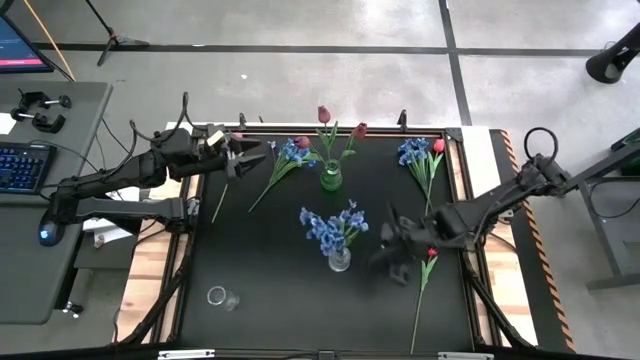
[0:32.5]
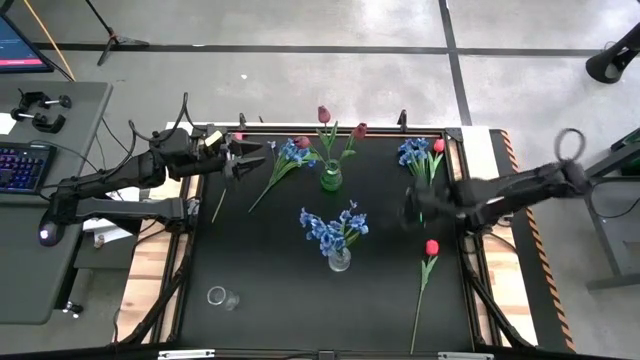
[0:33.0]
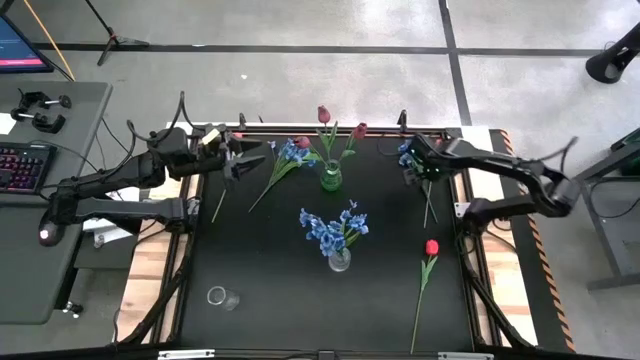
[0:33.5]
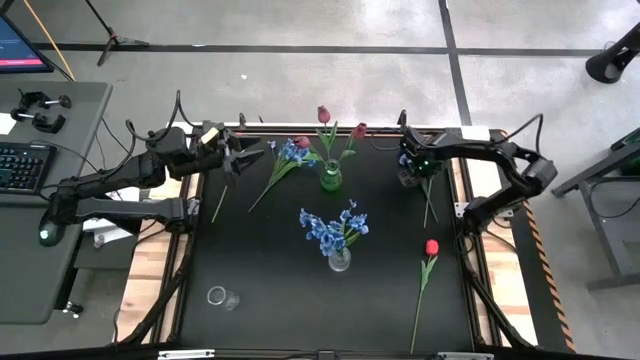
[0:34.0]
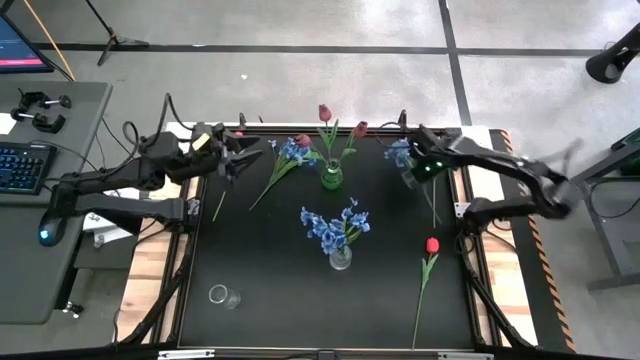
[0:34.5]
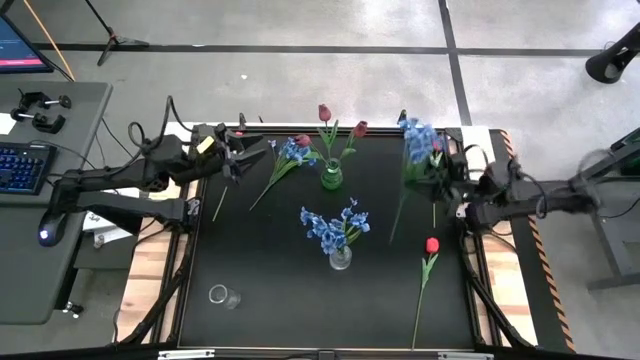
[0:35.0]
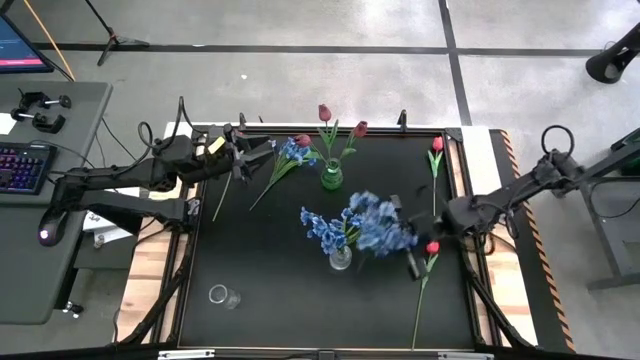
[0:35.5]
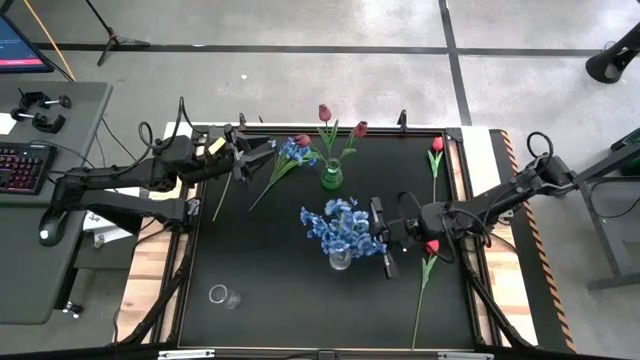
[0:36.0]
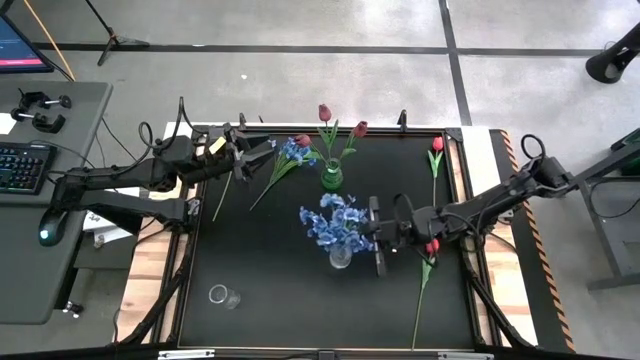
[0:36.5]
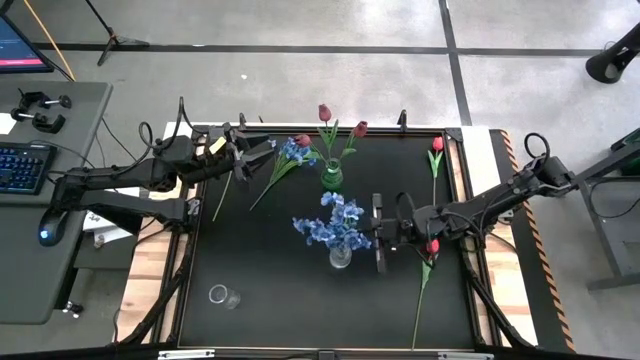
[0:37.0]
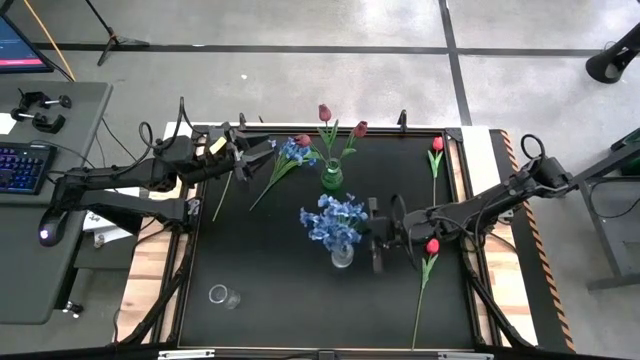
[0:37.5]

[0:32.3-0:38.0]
Task: Sort flowers into vase by color
Put the right blue flowers into the right transparent vase

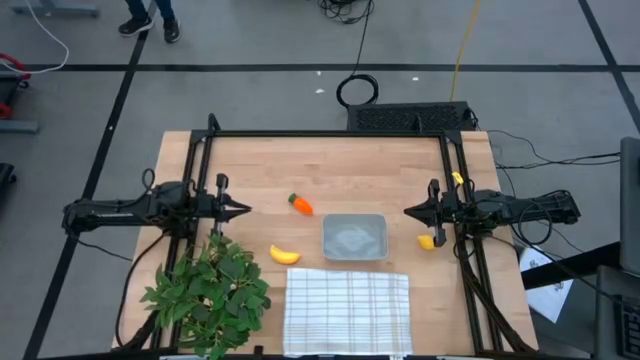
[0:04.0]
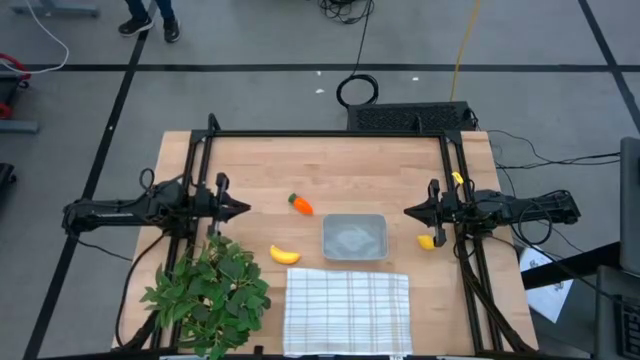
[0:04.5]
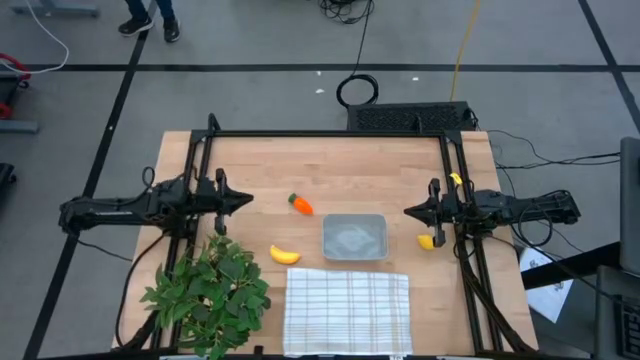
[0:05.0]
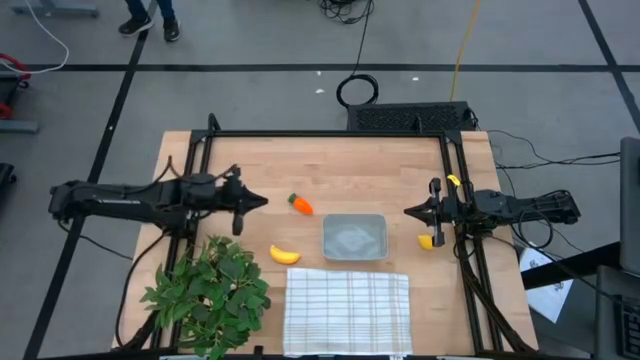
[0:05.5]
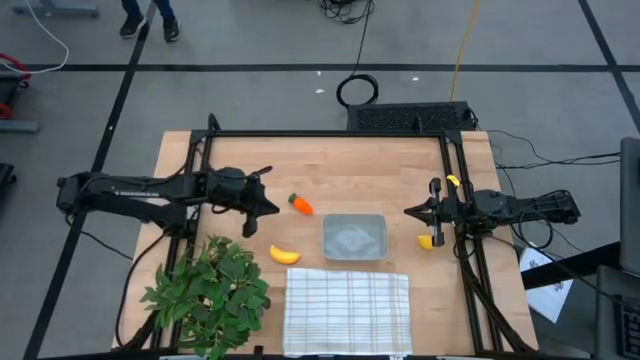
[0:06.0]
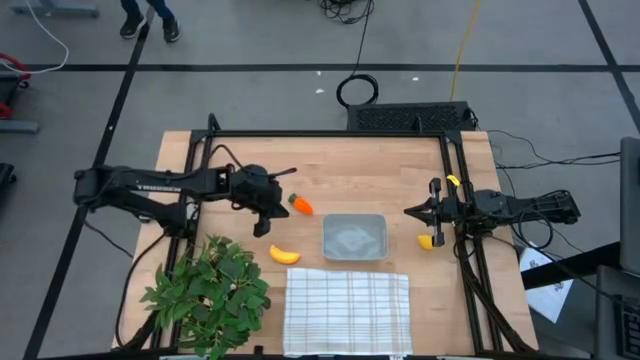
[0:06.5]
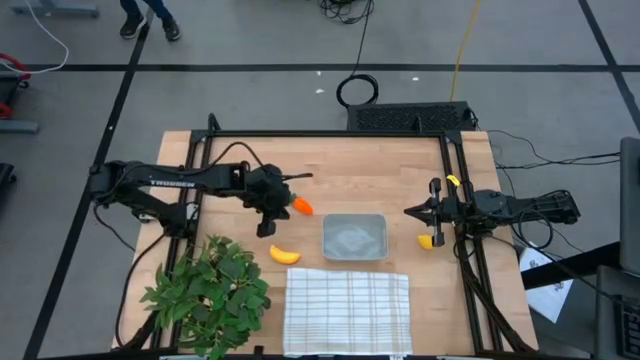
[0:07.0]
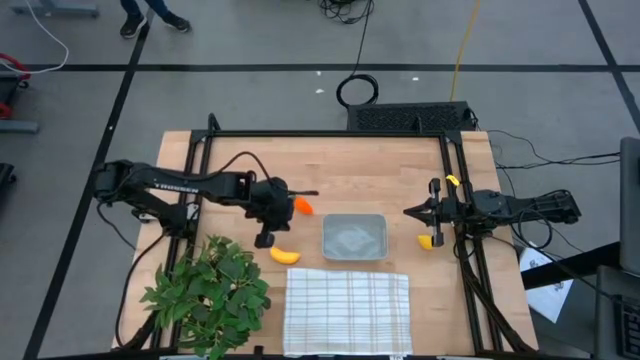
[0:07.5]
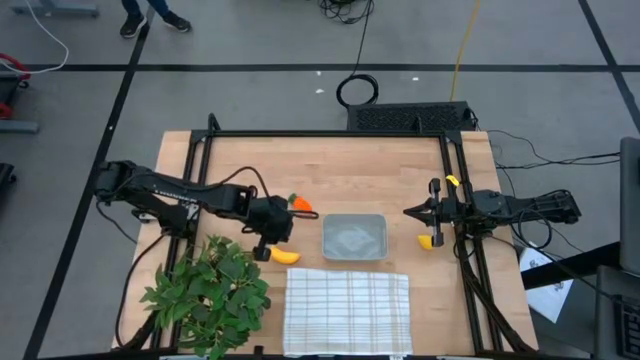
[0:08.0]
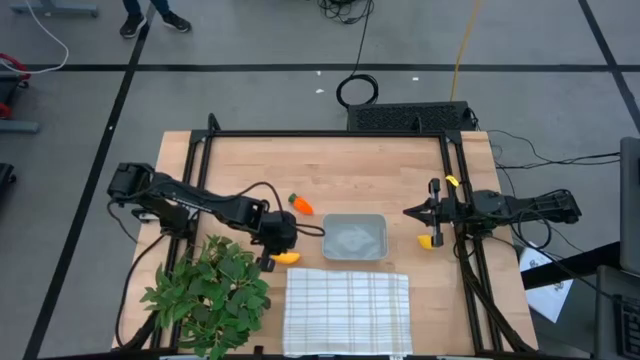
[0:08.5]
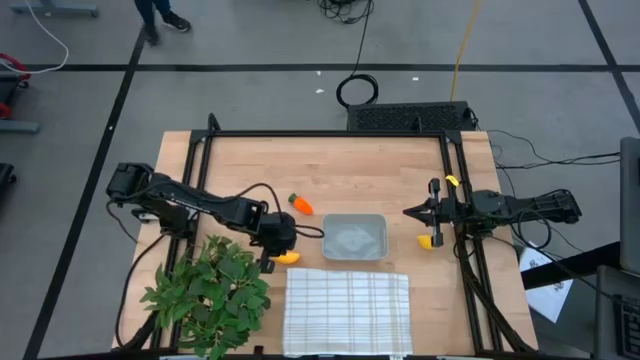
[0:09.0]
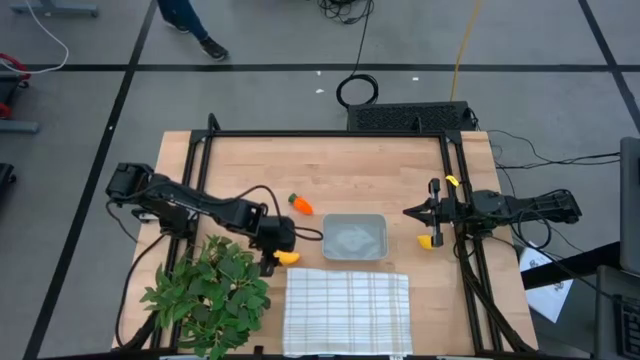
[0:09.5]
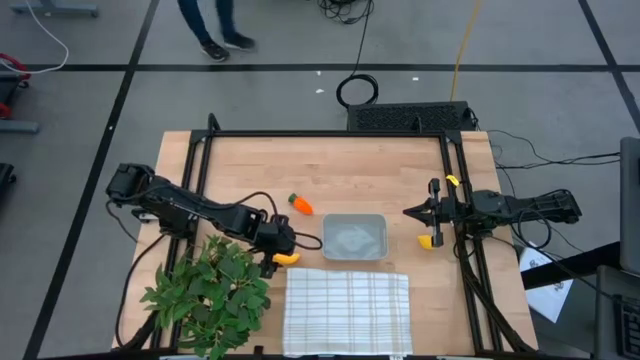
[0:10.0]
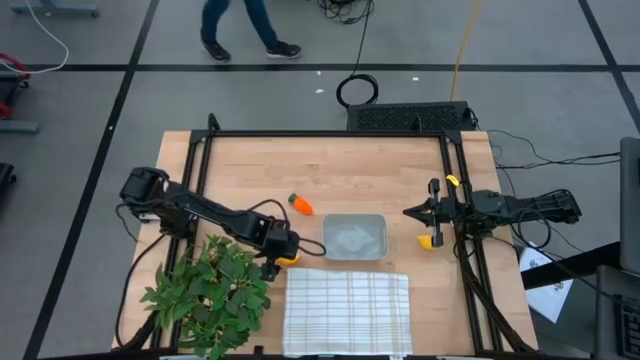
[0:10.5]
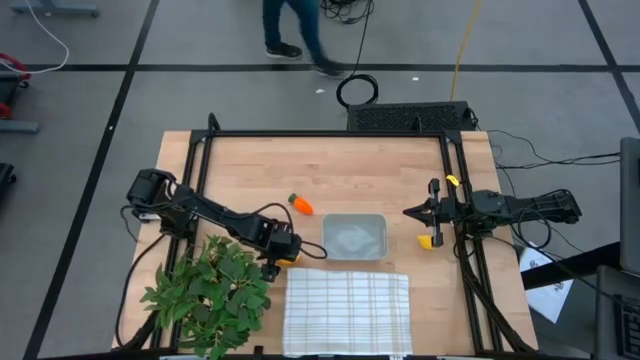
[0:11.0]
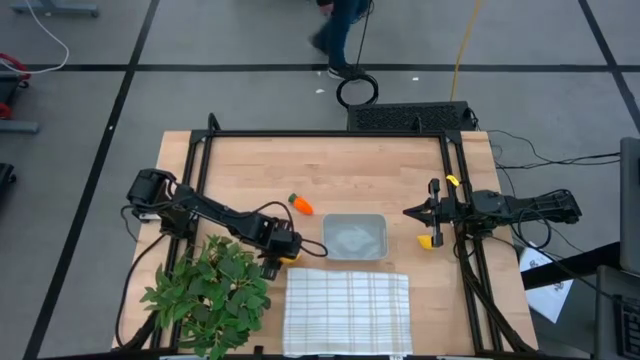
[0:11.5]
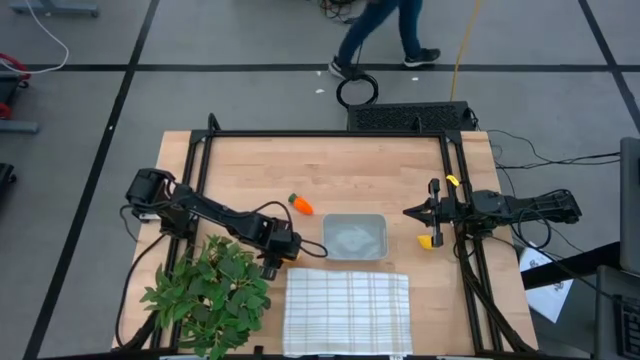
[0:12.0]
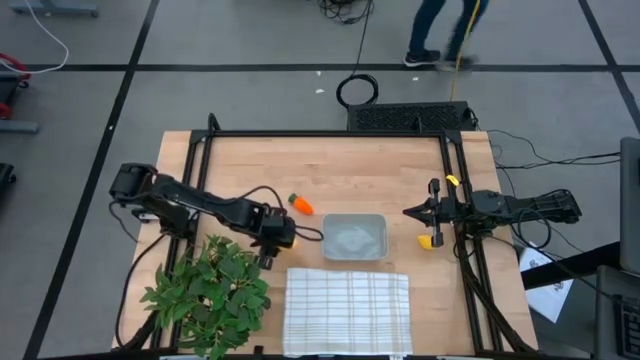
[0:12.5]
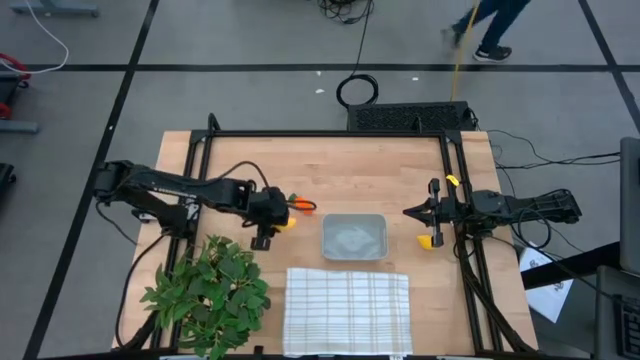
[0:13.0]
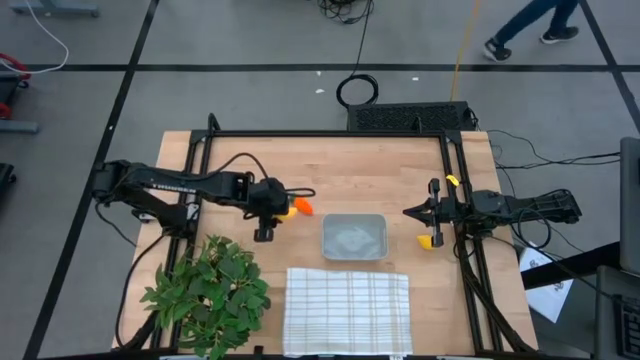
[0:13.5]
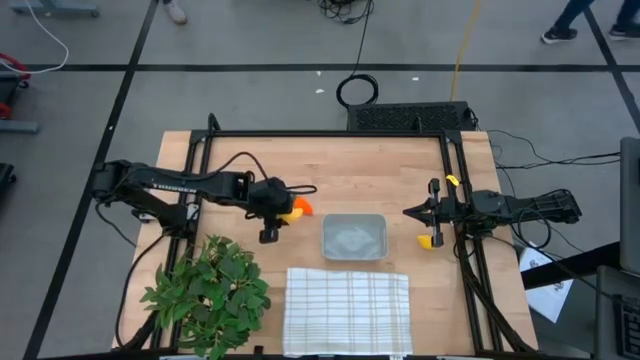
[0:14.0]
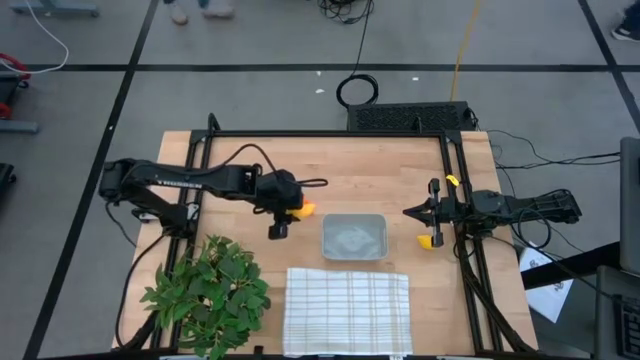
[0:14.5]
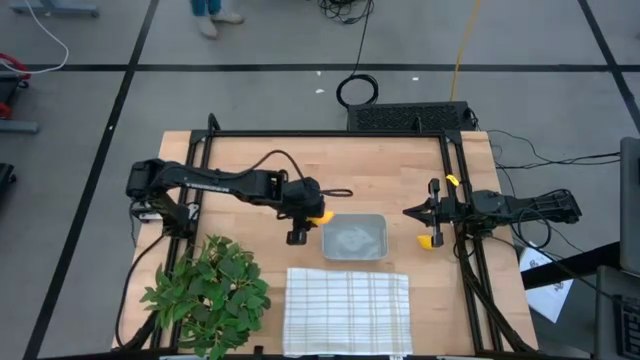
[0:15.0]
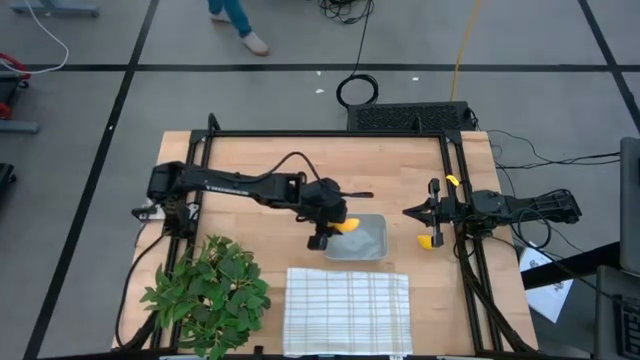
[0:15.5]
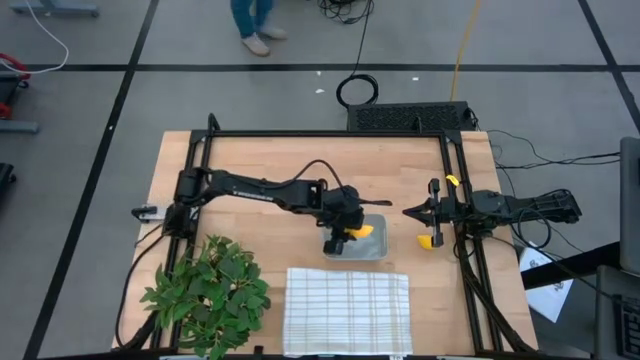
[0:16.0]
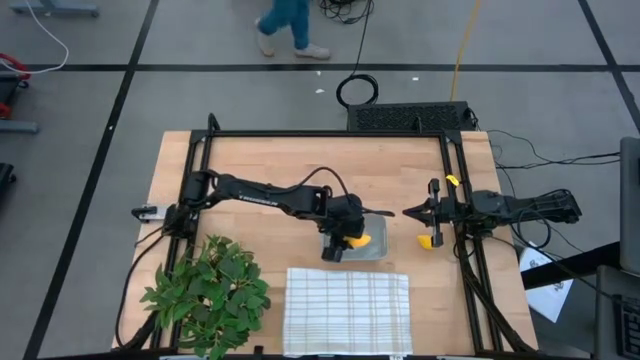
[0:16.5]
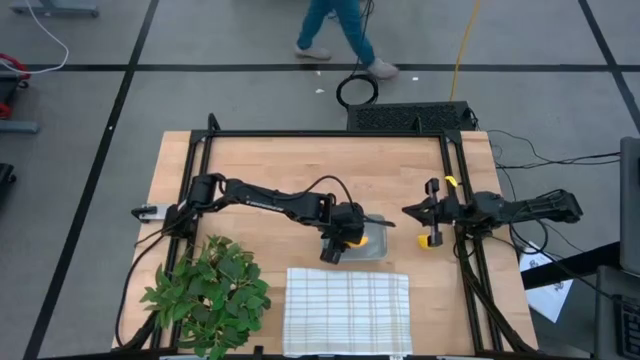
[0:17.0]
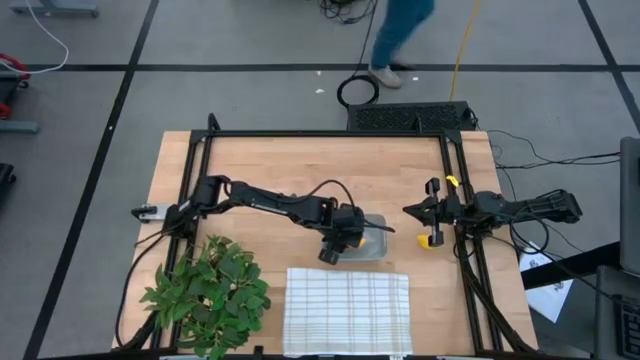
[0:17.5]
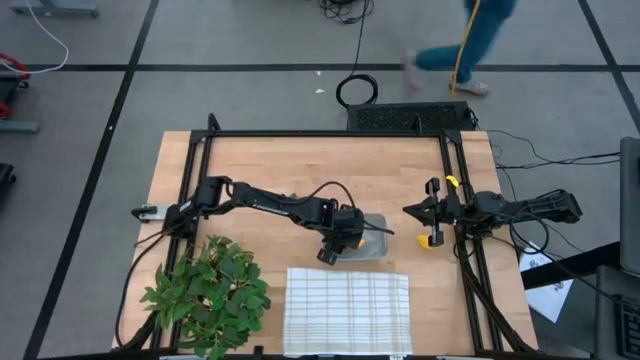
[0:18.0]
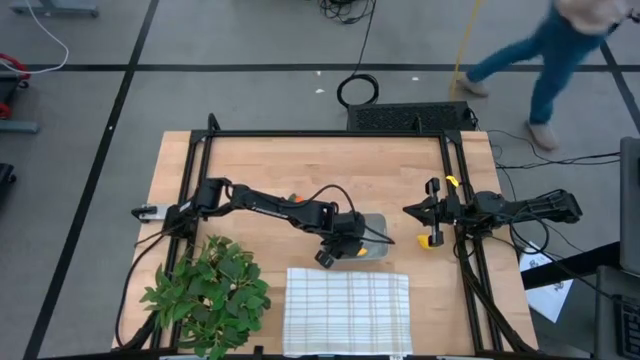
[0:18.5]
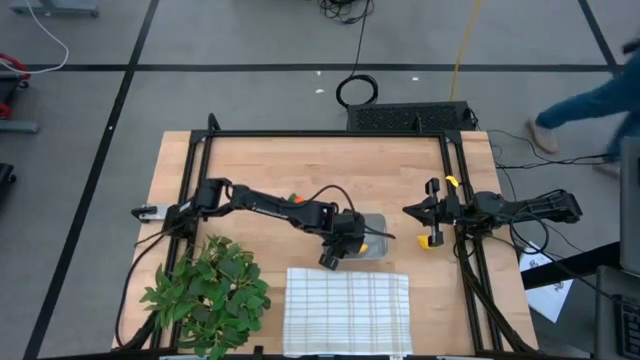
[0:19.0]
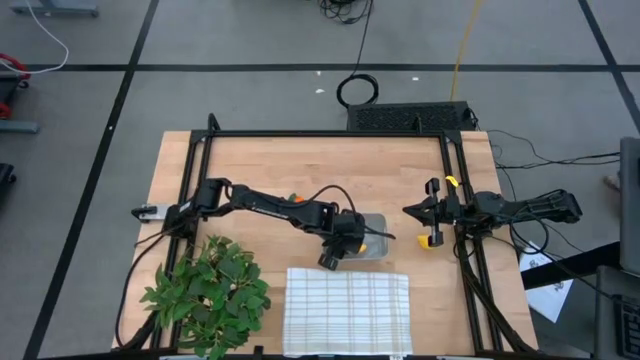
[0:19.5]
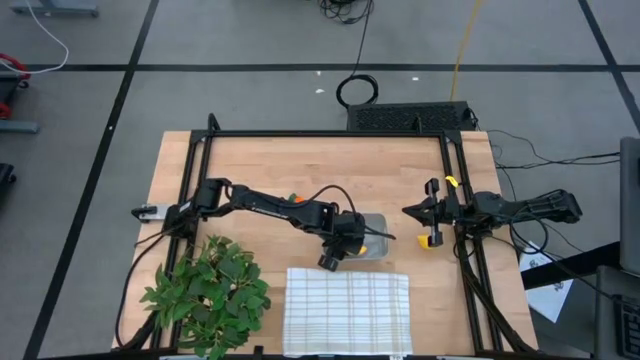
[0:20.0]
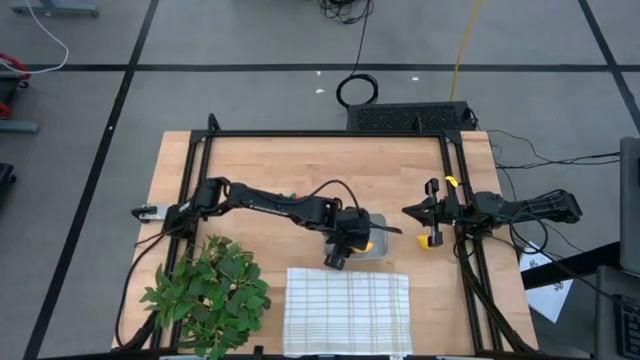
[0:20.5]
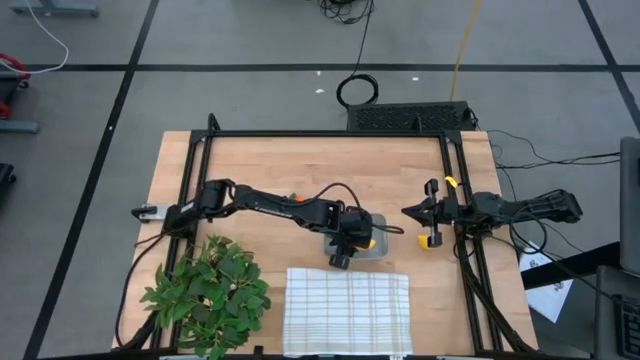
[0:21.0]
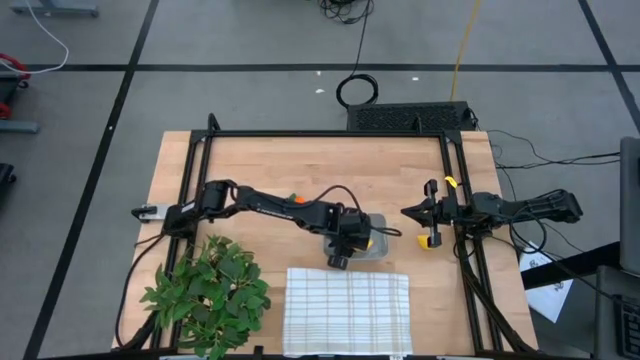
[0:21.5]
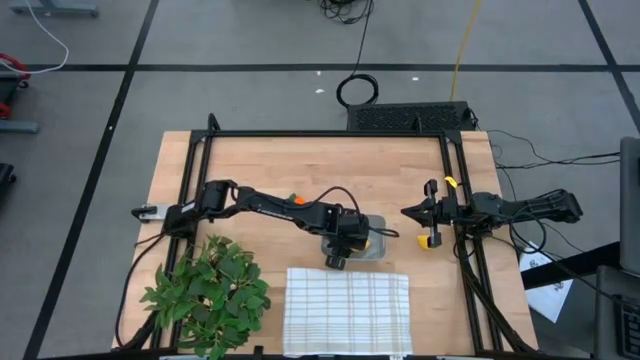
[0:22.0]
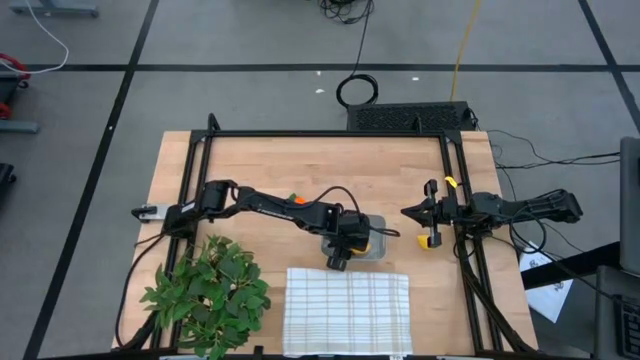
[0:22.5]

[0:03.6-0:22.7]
Task: Pick and placing Produce into tupperware
Put the yellow banana into the gray bin
